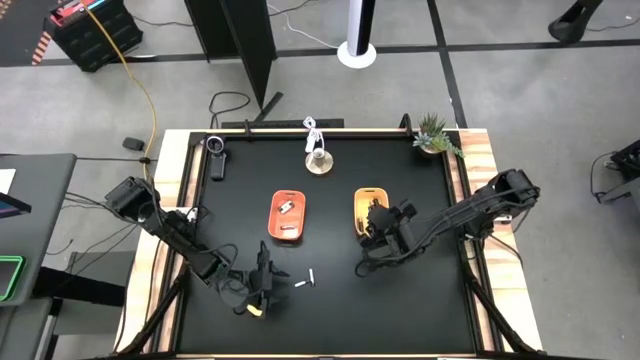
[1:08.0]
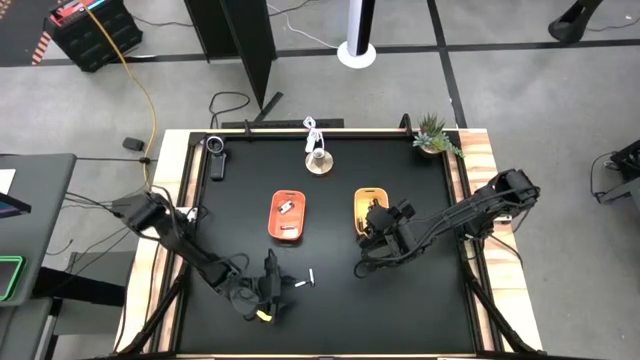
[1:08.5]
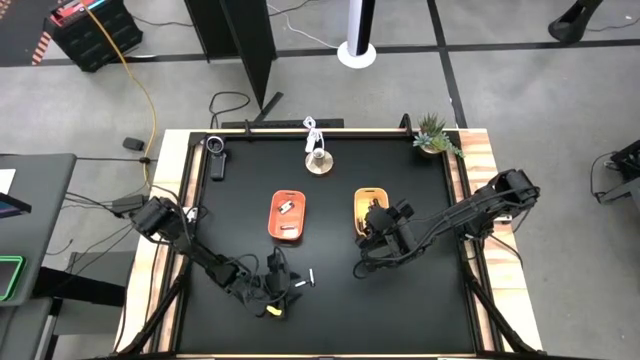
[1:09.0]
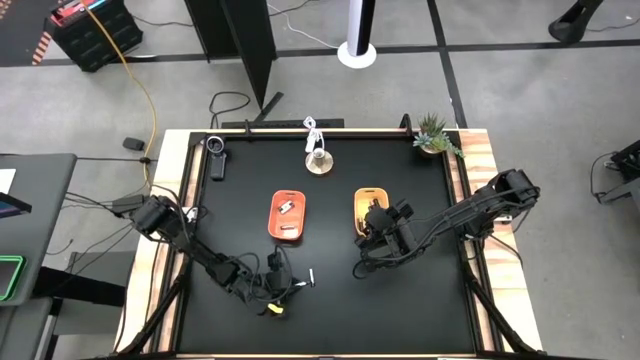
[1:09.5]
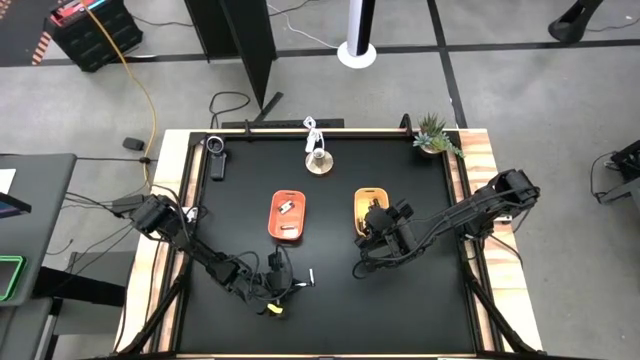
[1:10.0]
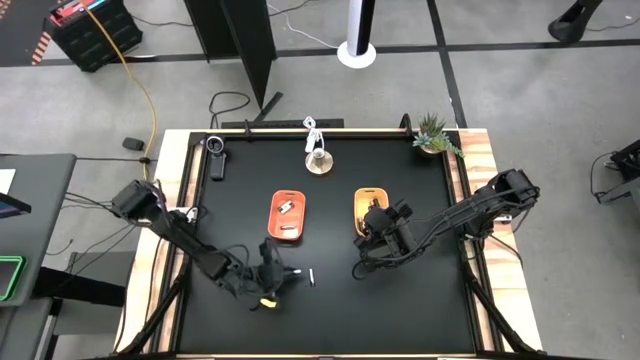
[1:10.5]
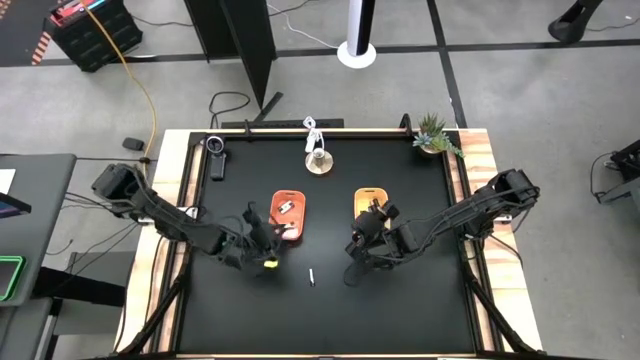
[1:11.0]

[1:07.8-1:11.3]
Task: Sort batteries
Put the silver battery into the orange bin

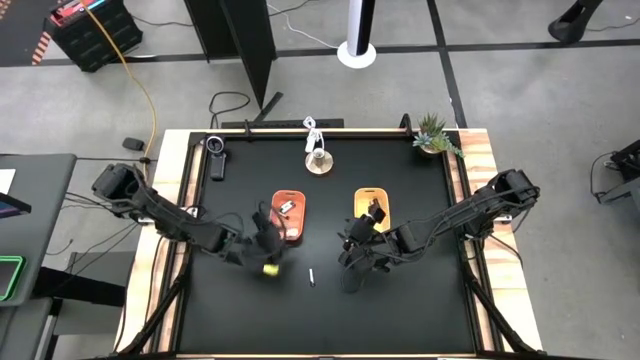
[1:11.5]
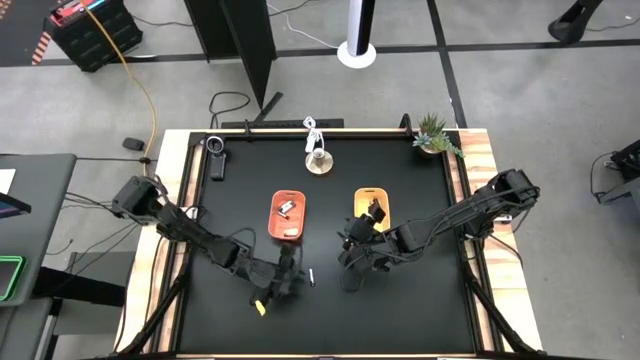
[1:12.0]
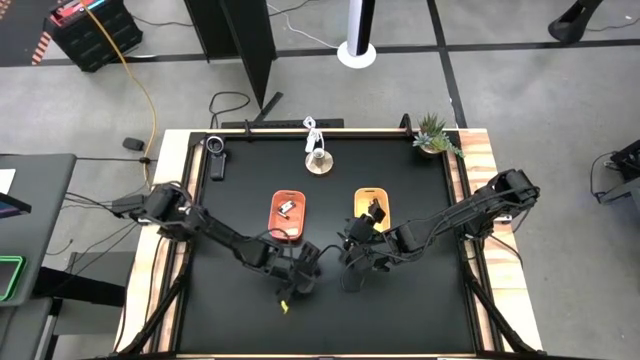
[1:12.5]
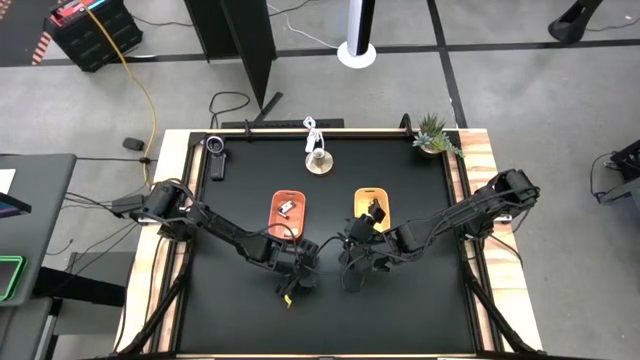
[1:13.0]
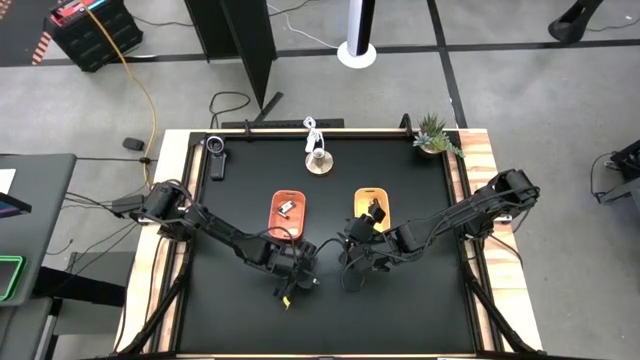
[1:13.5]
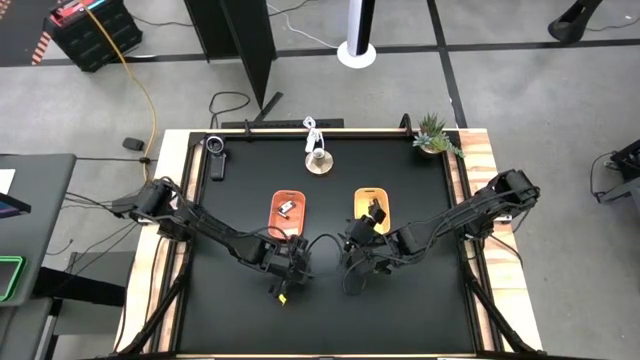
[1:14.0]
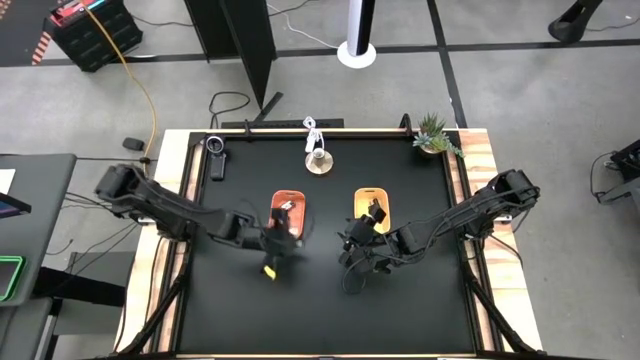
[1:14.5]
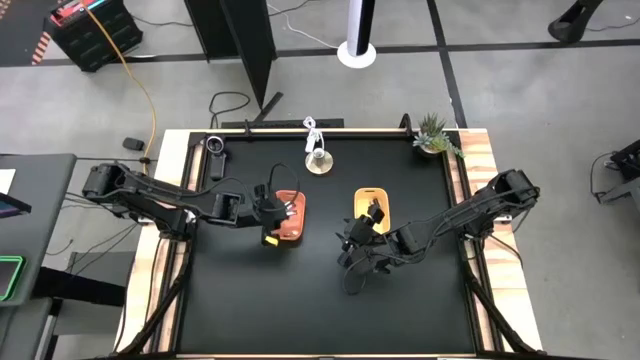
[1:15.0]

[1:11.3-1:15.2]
Put the silver battery into the orange bin

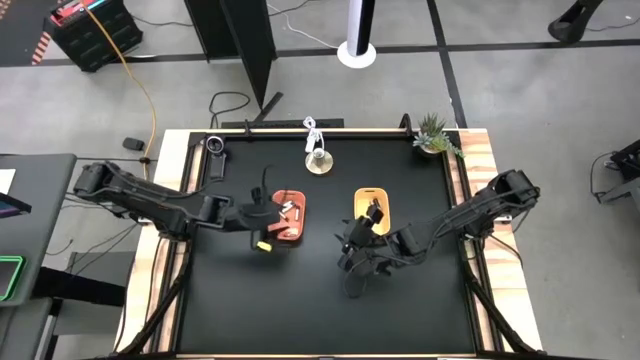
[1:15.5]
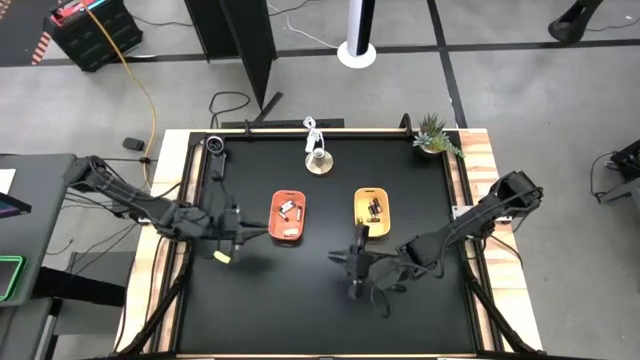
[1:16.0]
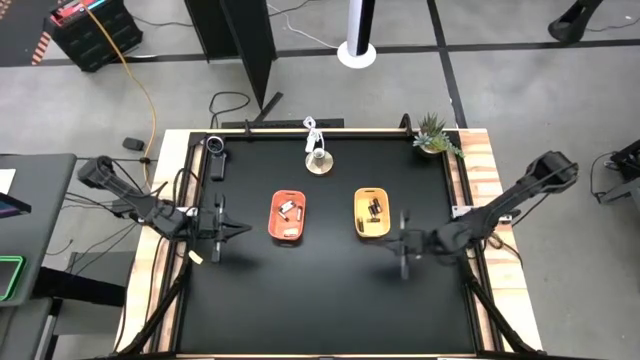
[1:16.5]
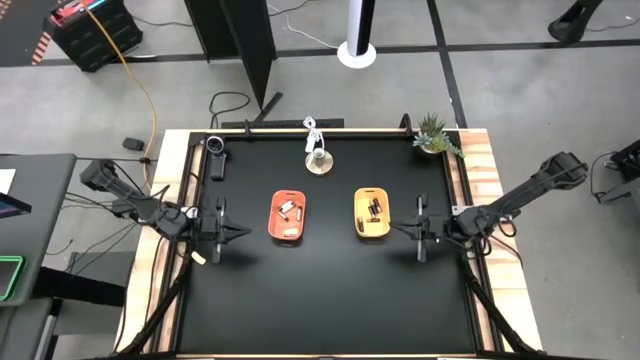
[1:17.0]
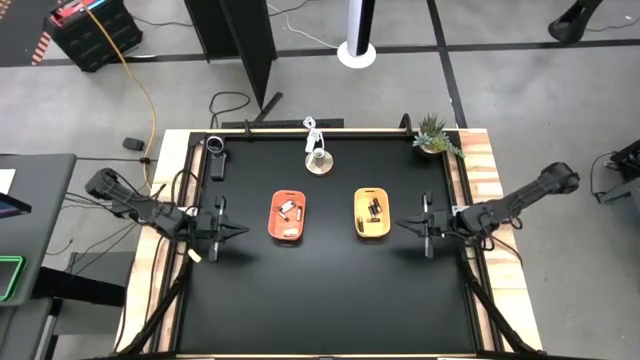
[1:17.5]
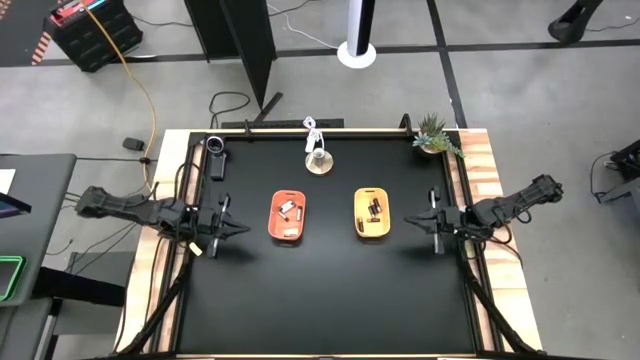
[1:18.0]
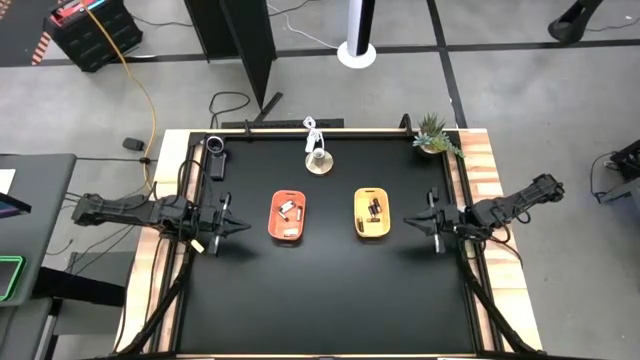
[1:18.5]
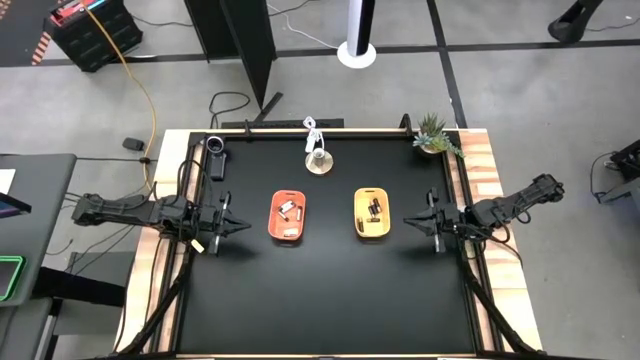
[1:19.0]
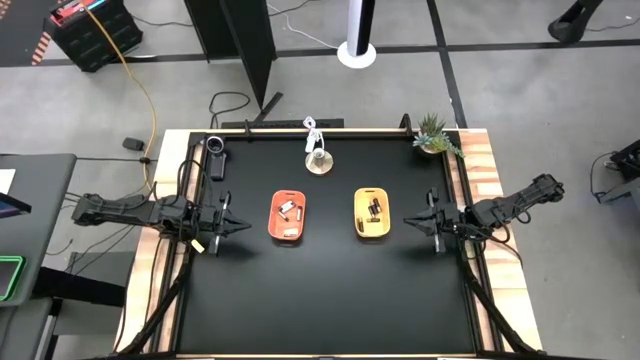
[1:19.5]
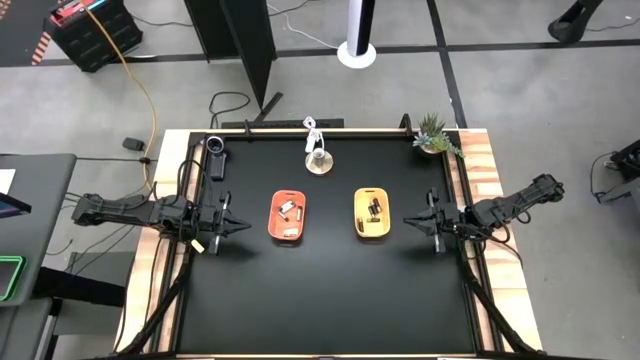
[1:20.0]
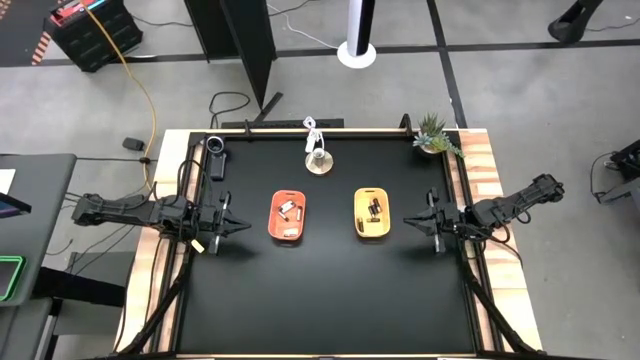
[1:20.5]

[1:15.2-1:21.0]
Return to Home Position

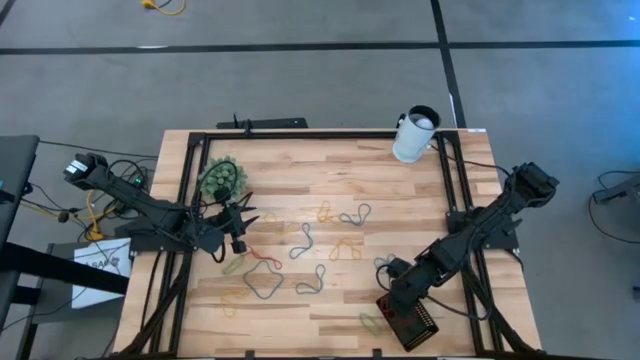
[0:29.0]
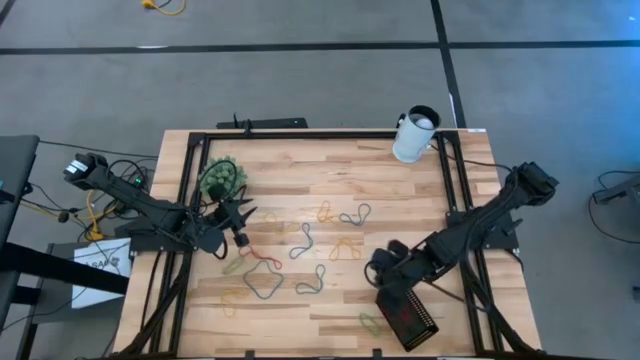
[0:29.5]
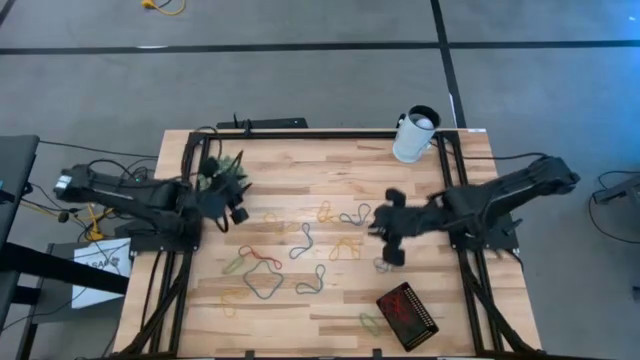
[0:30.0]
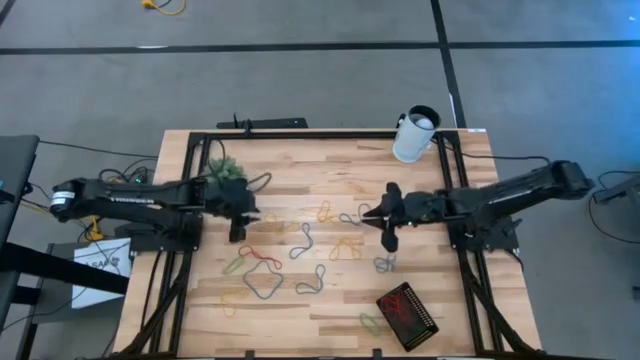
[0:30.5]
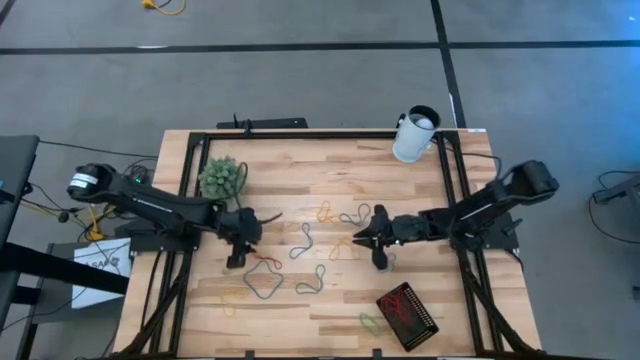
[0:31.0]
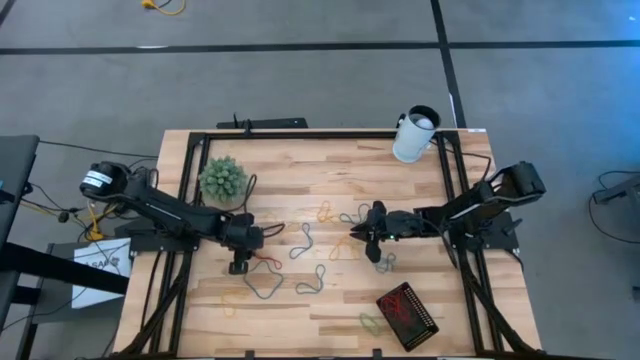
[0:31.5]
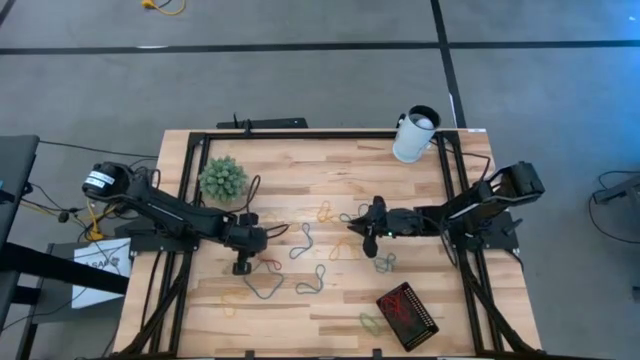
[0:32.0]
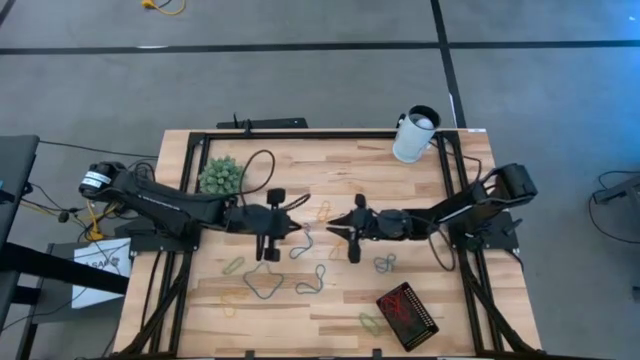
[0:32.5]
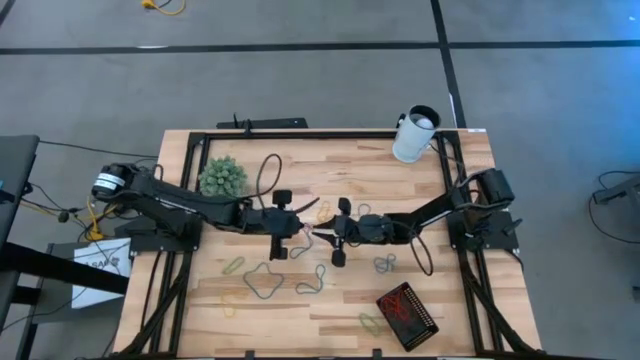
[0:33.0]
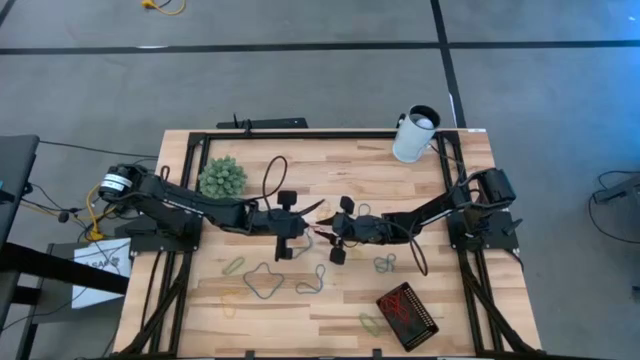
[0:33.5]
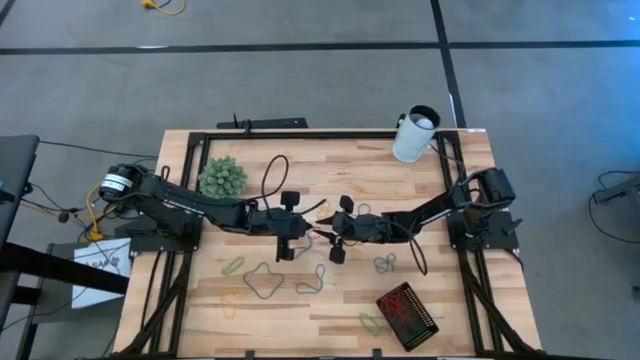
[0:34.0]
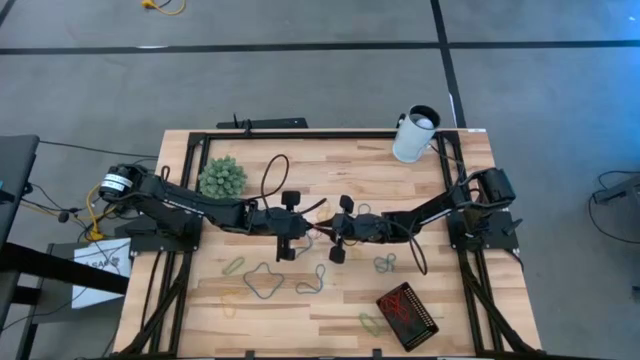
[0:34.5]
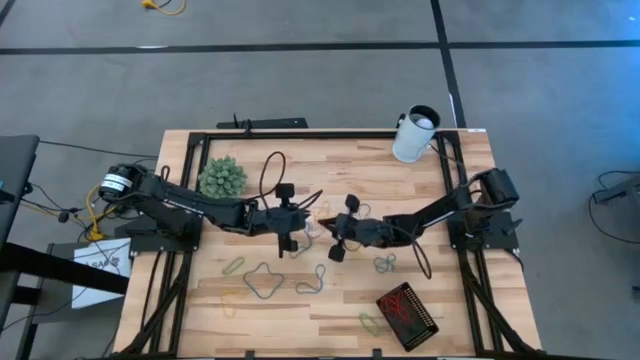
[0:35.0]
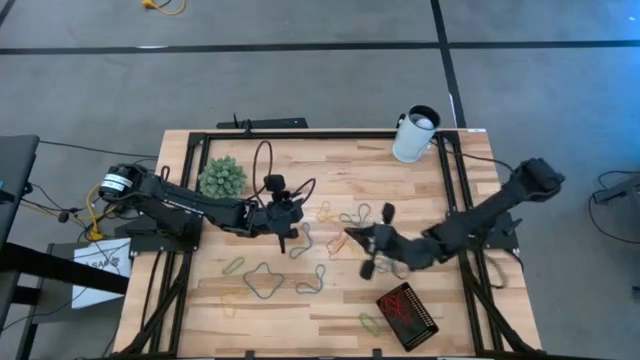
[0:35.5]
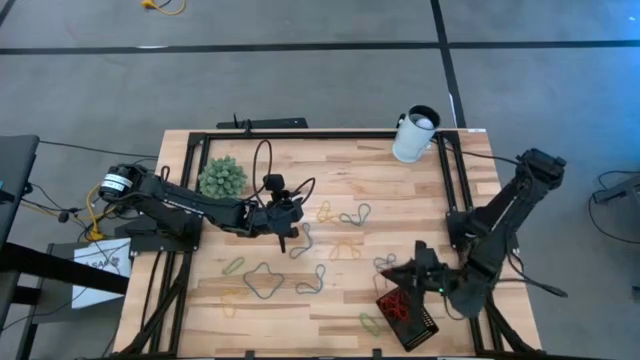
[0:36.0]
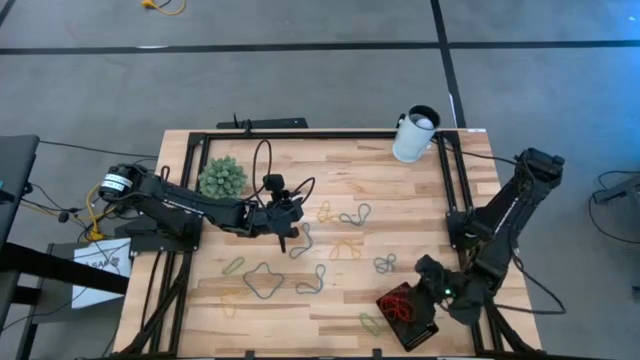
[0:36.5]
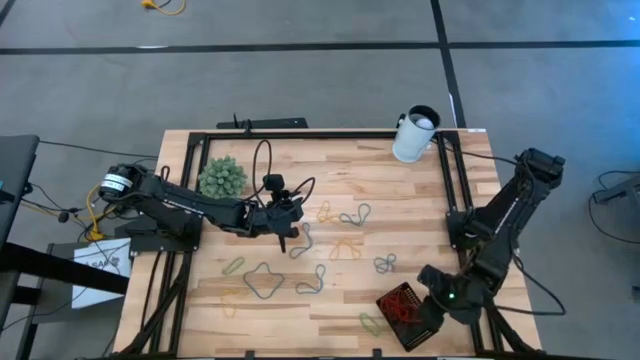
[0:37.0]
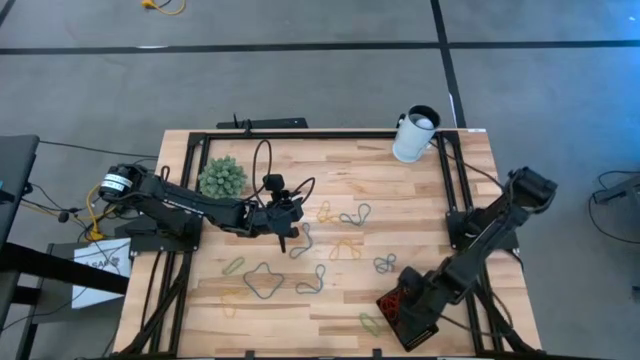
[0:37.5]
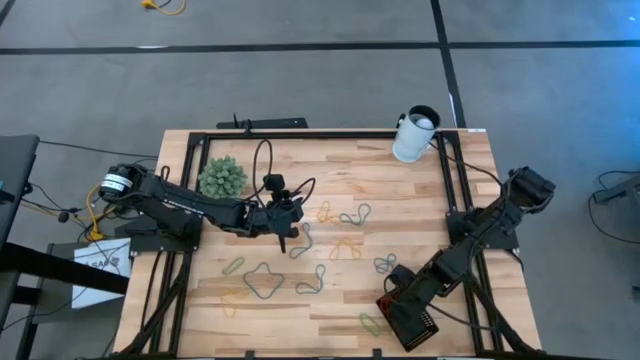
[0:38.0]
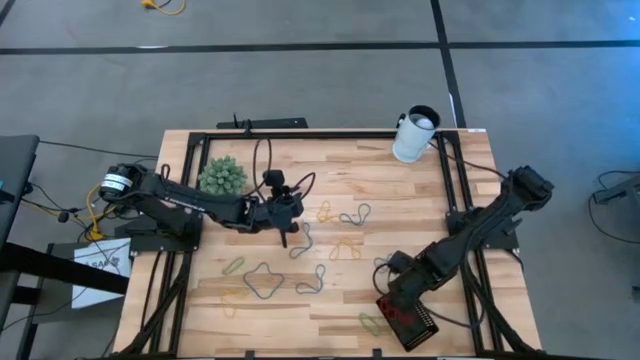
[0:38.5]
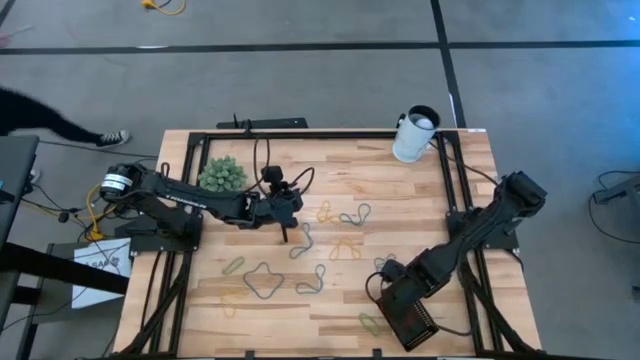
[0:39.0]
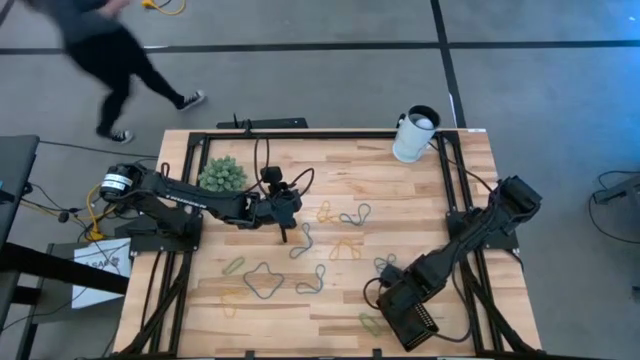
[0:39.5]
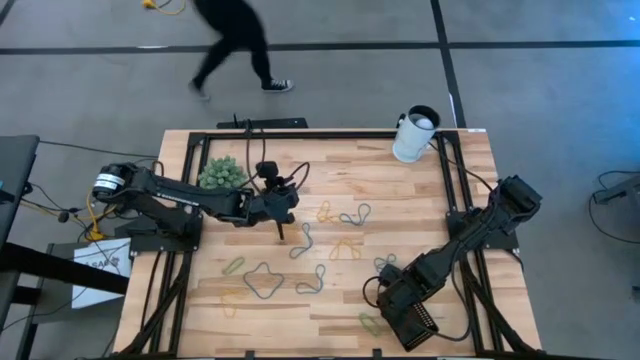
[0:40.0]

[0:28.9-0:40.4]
Task: Pick and place rubber bands into bin
Put the red rubber band into the black basket
